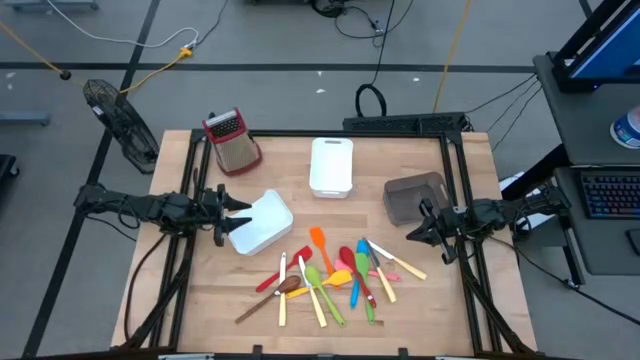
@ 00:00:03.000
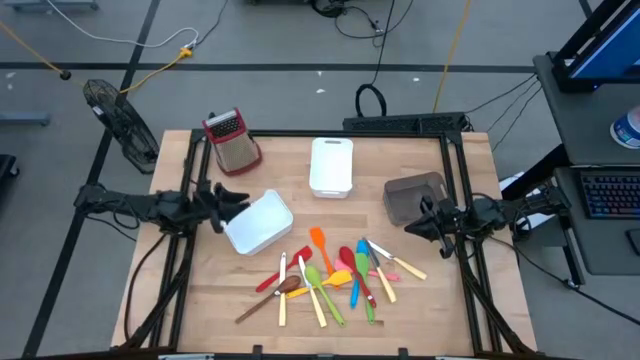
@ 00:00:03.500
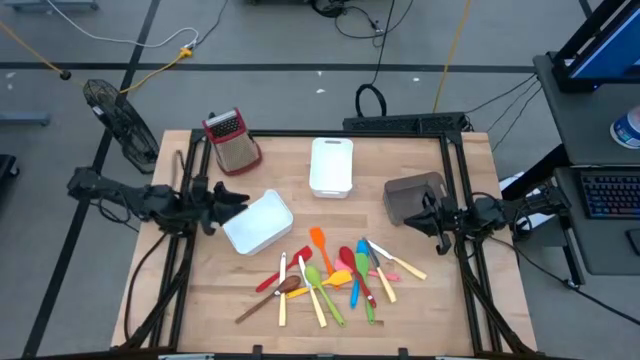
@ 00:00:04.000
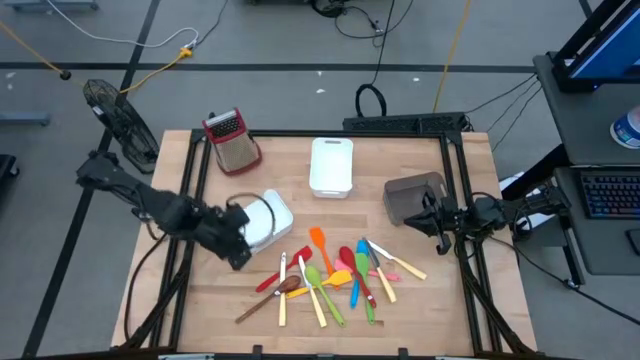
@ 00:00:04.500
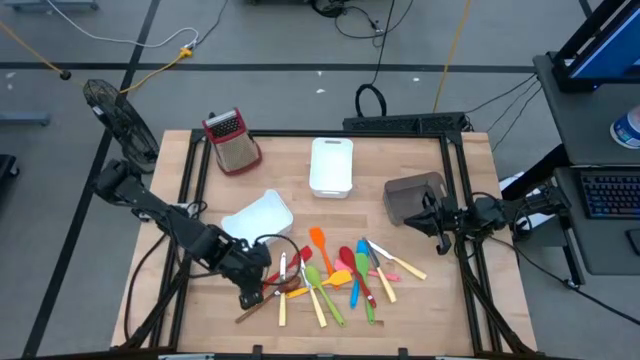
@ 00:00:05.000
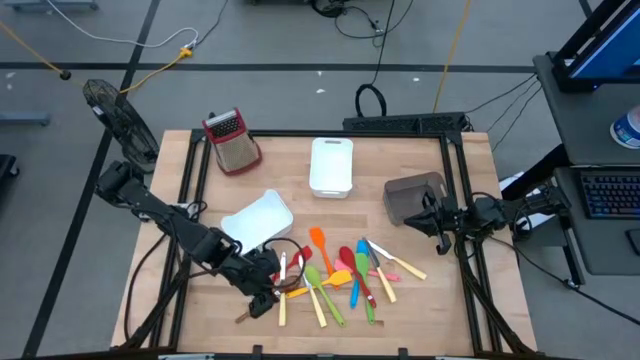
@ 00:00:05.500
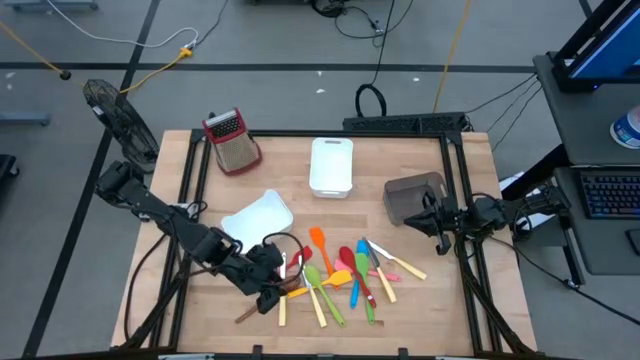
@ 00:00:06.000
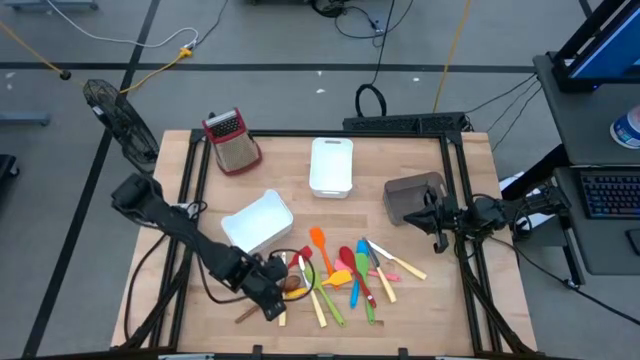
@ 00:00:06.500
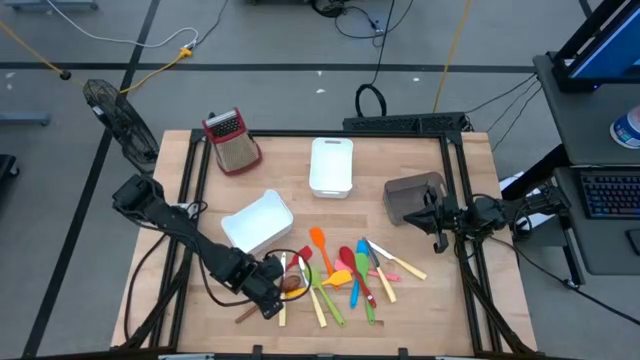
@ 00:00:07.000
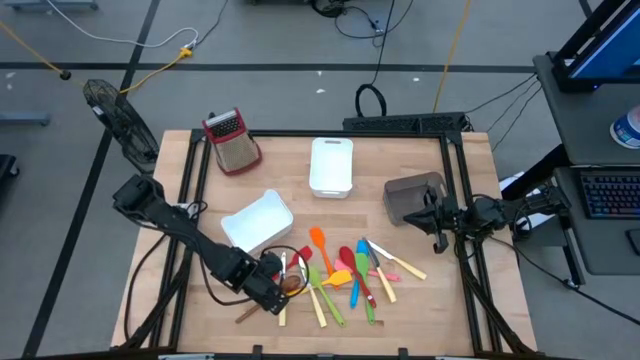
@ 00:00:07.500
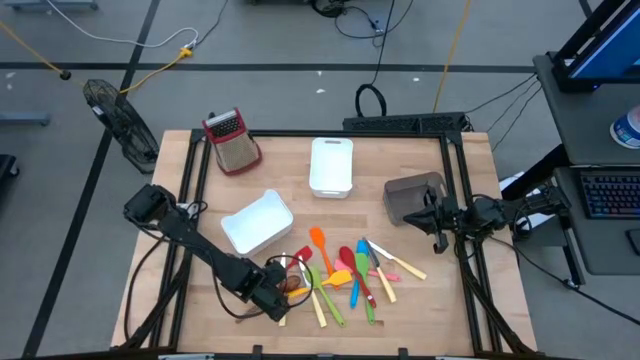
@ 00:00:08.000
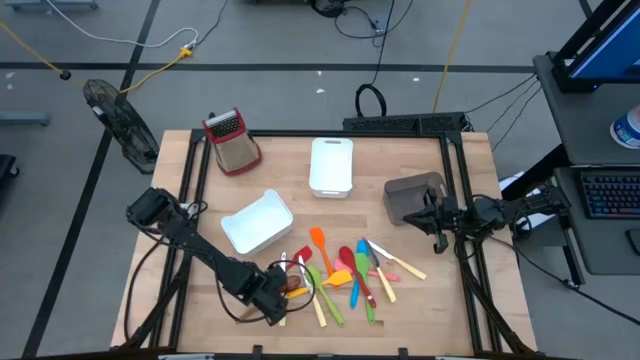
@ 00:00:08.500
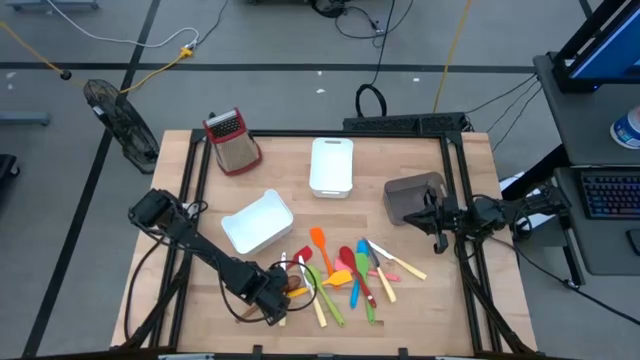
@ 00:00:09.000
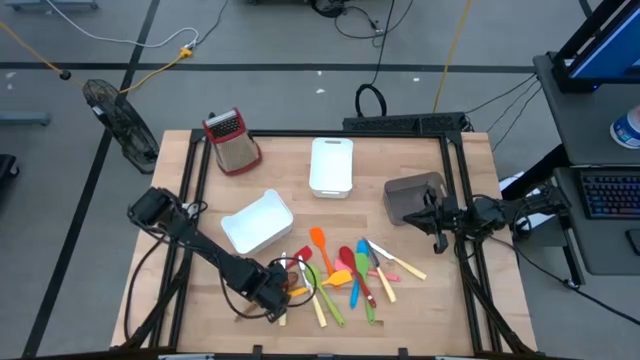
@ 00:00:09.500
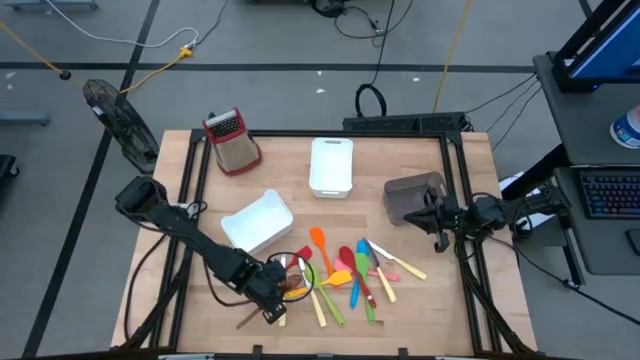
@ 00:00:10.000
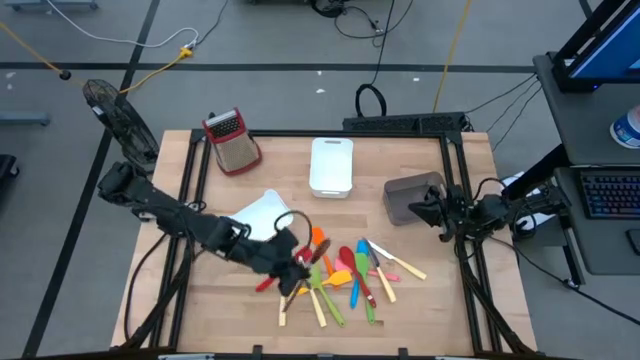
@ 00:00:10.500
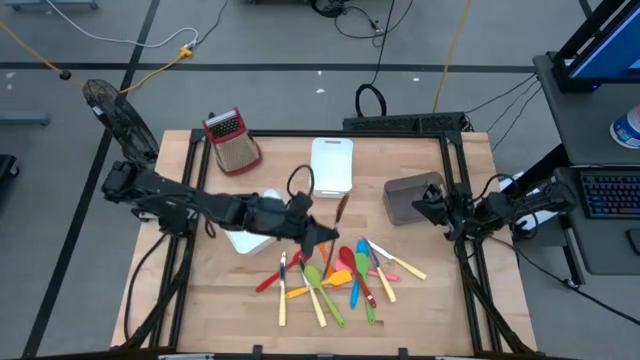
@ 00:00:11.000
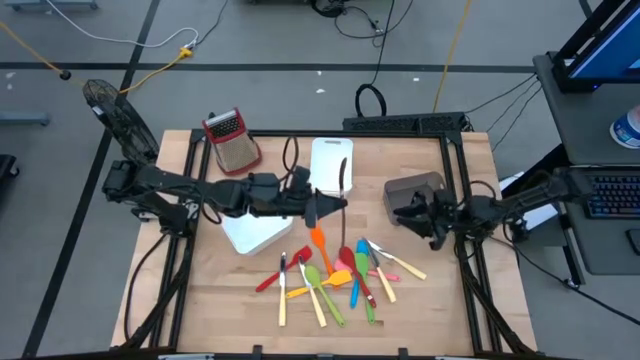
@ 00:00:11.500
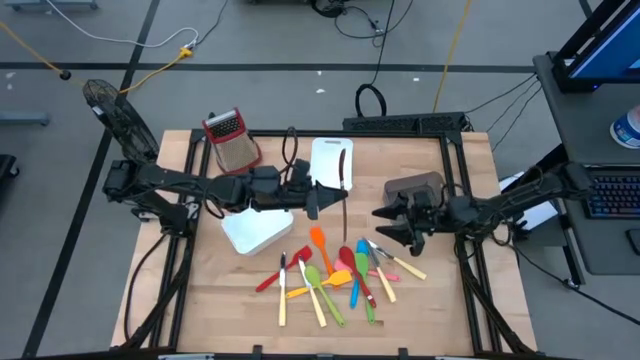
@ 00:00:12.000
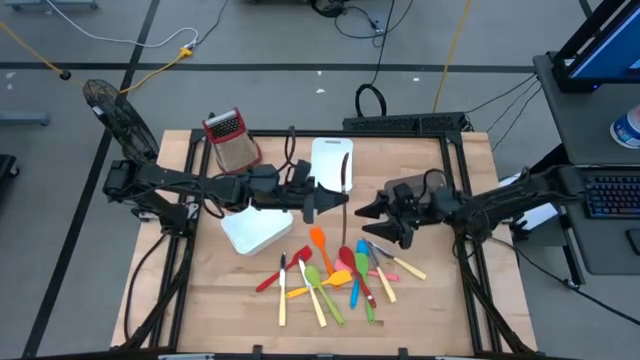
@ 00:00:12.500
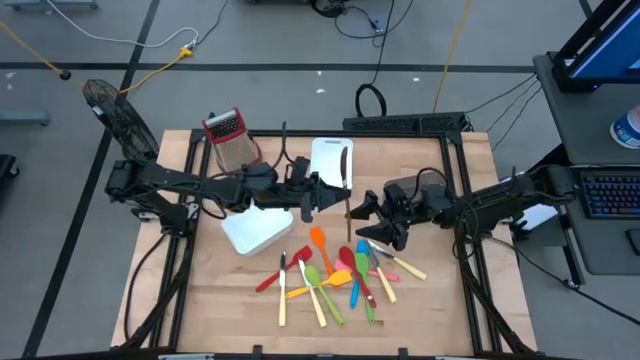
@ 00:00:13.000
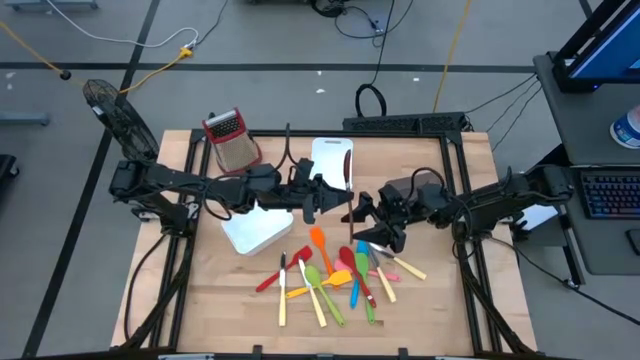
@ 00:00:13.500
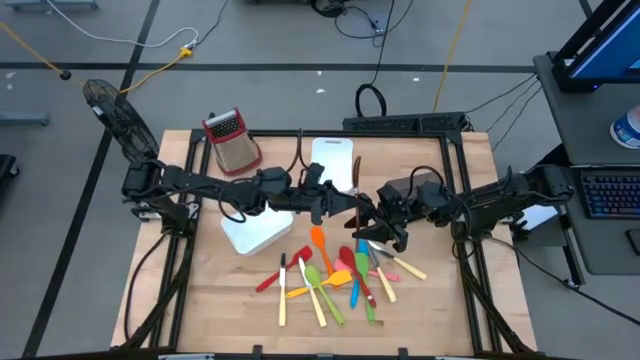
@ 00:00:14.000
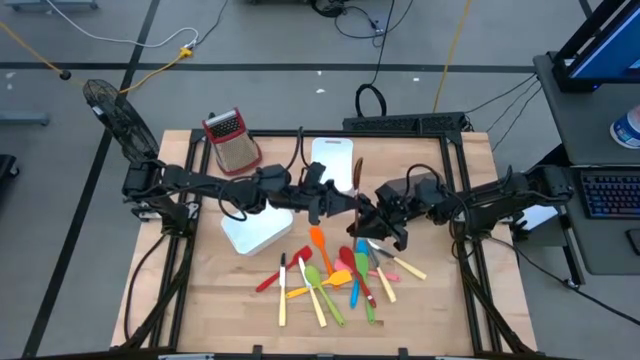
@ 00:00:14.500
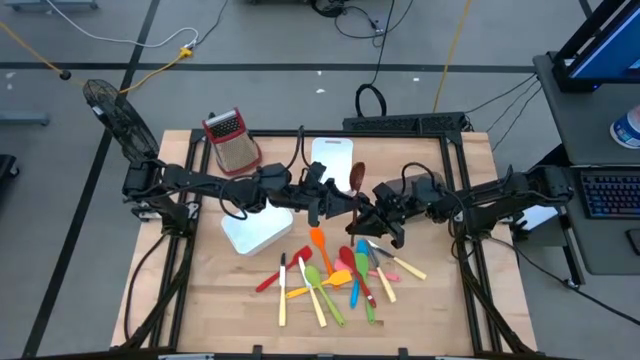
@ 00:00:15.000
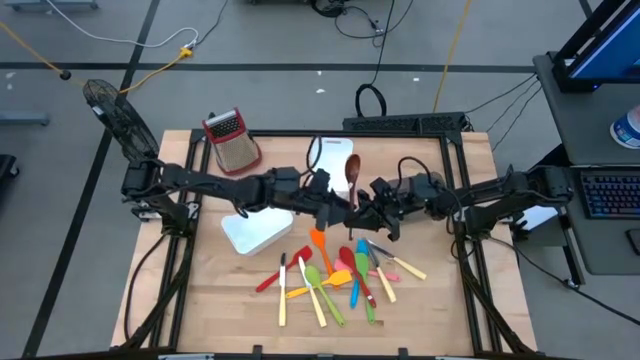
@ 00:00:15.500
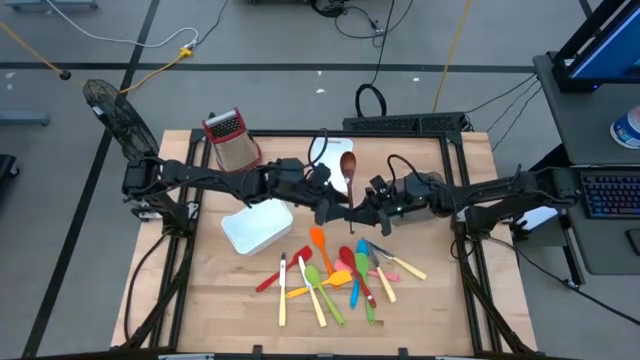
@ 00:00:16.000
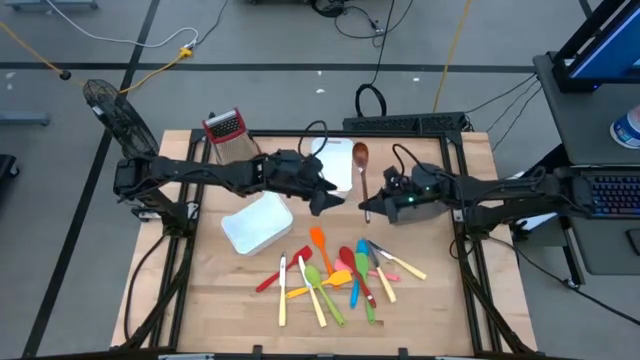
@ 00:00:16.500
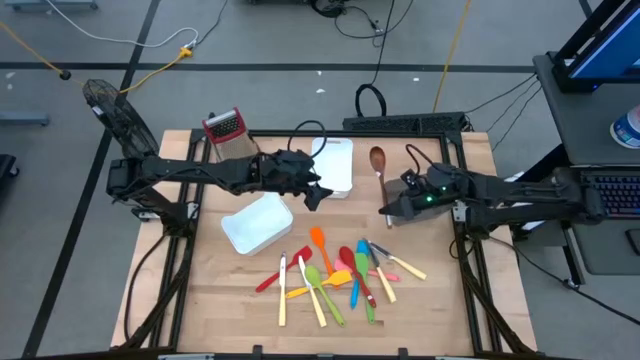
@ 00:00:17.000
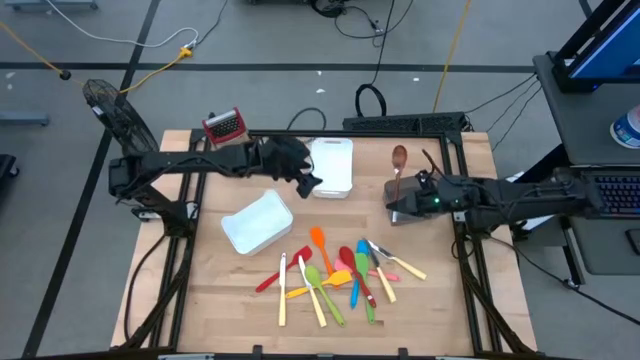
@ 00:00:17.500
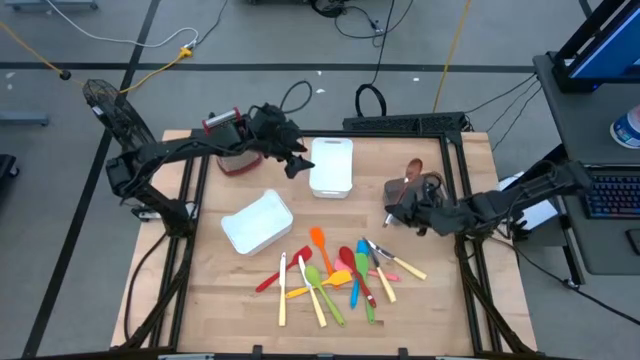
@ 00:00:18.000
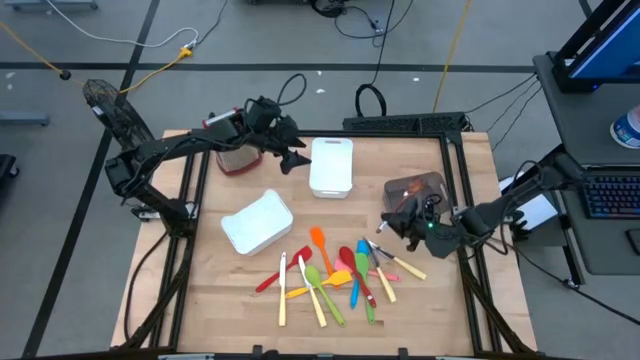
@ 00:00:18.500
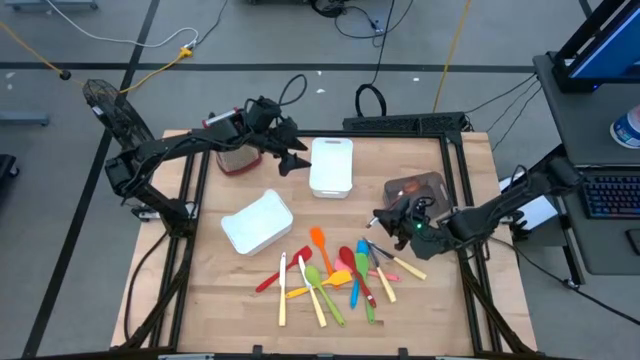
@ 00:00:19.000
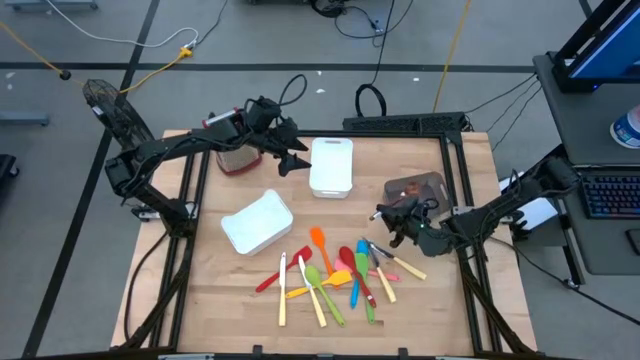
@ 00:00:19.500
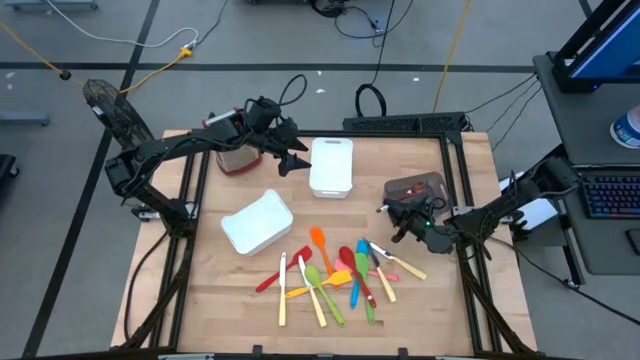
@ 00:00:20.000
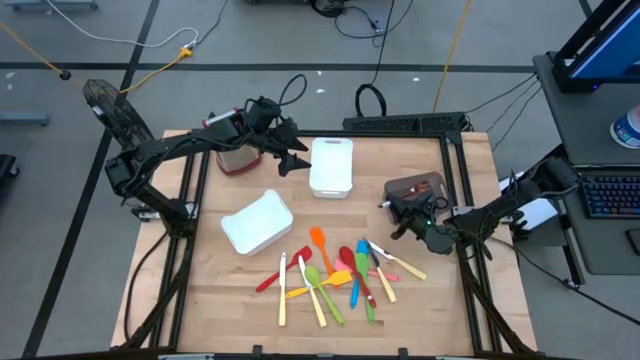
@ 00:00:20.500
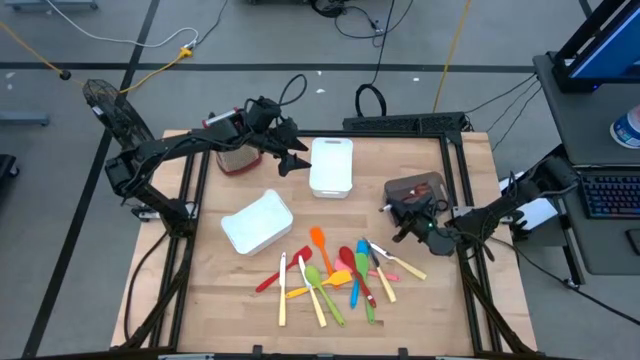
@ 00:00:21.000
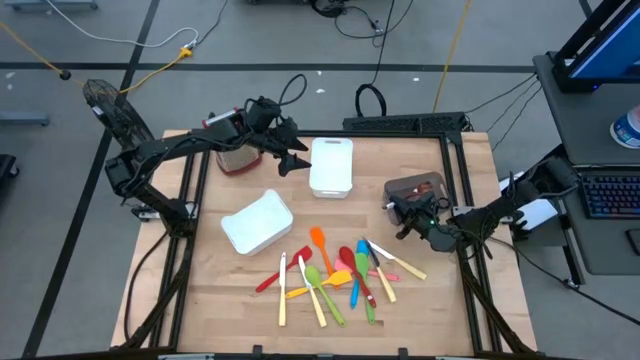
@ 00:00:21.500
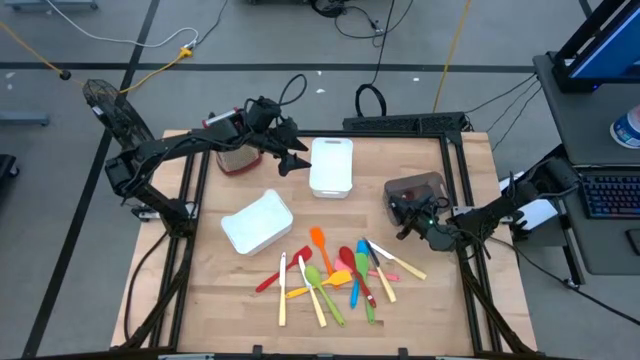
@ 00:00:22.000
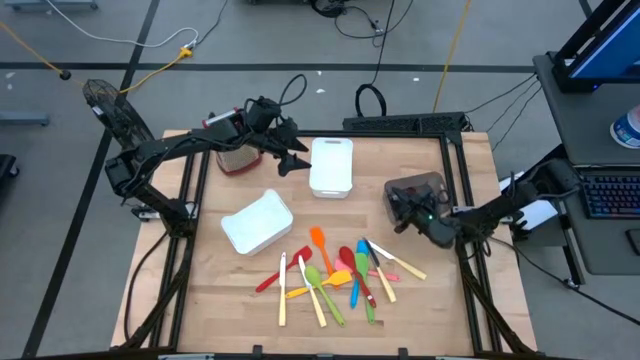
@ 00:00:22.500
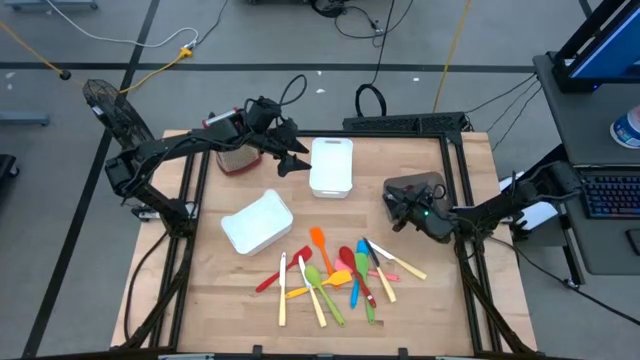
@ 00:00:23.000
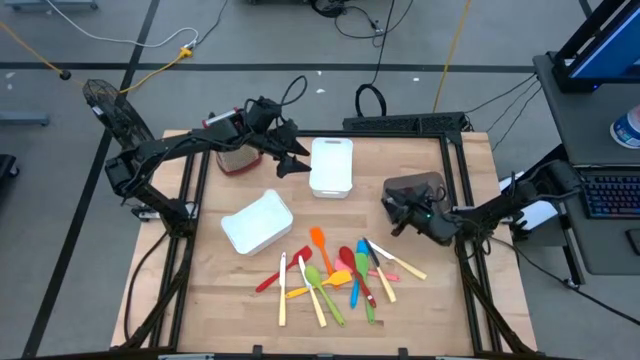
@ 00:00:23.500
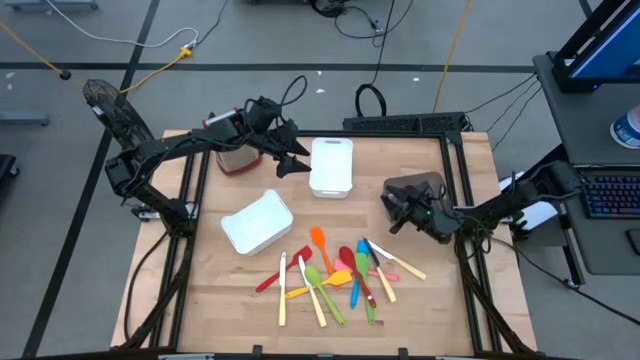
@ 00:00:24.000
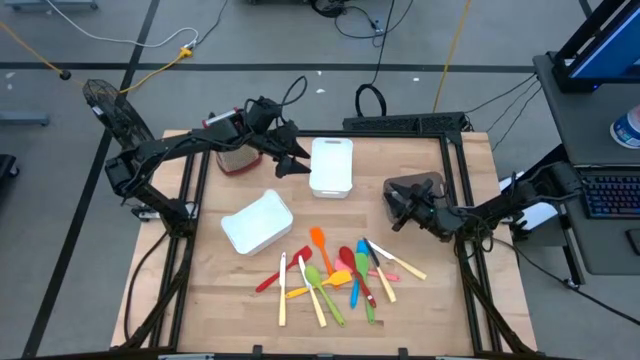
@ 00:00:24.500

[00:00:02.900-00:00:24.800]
Task: Pick & Place Kitchen Items
Put the brown serving spoon into the black bin
